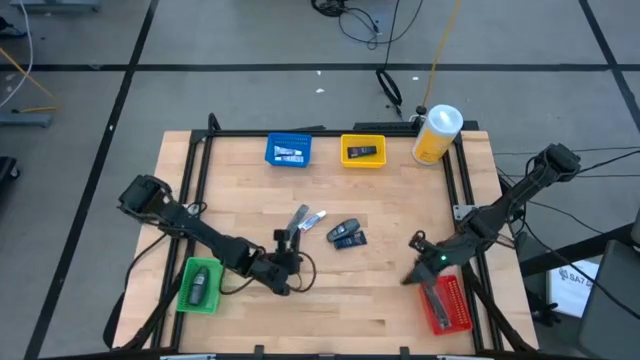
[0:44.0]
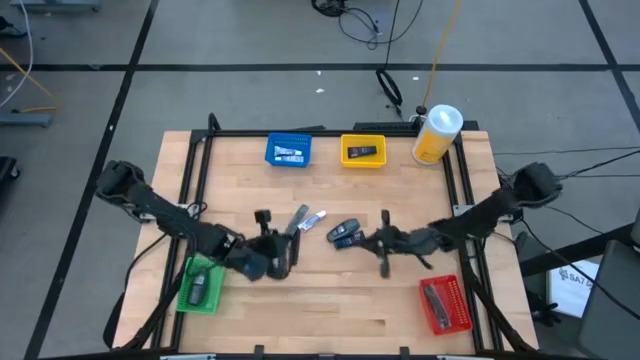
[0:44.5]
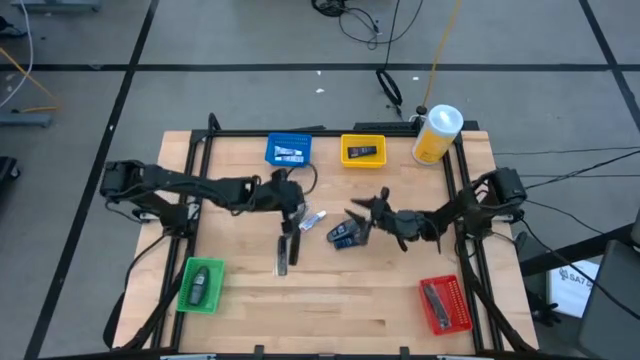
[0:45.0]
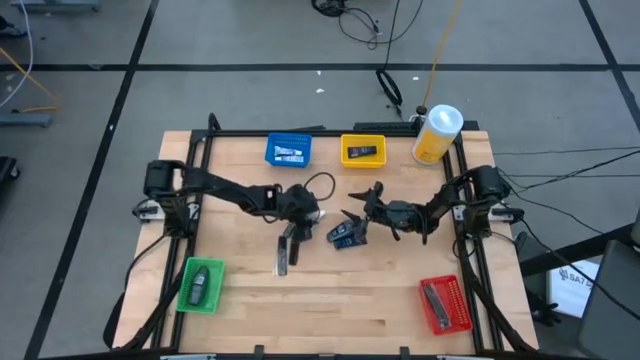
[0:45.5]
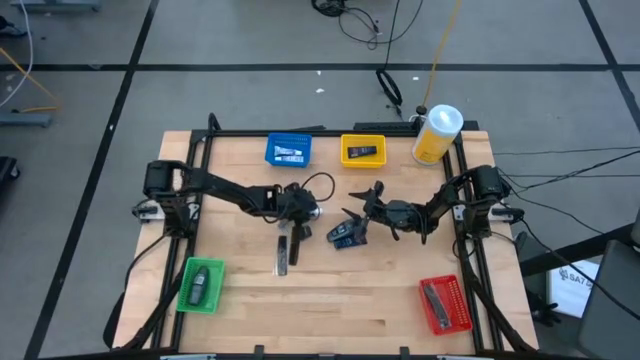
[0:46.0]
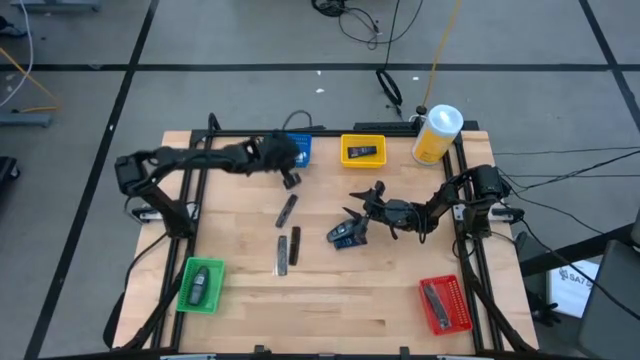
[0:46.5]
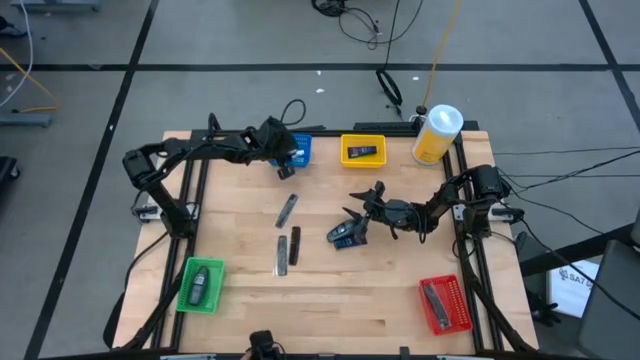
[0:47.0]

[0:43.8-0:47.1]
Task: Pick & Place Travel size toiletries
Put the white toothpaste into the blue bin

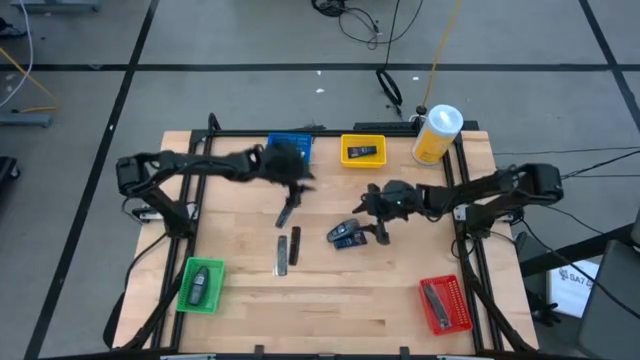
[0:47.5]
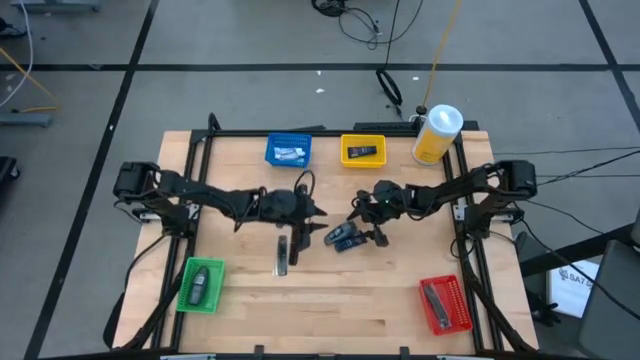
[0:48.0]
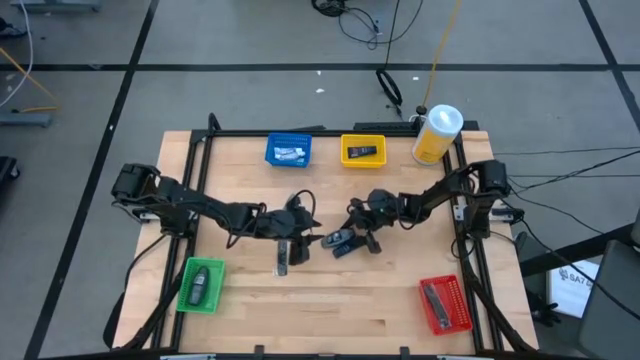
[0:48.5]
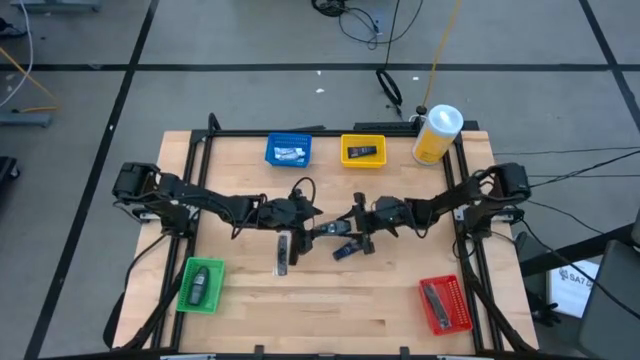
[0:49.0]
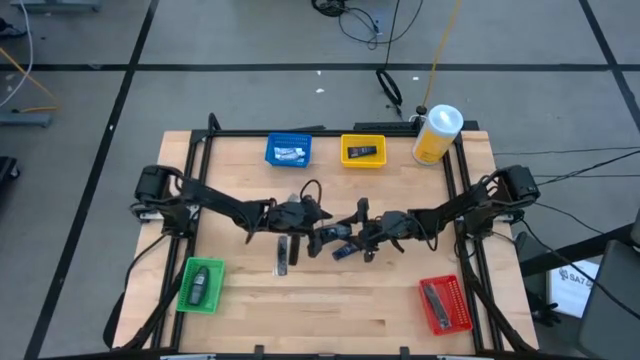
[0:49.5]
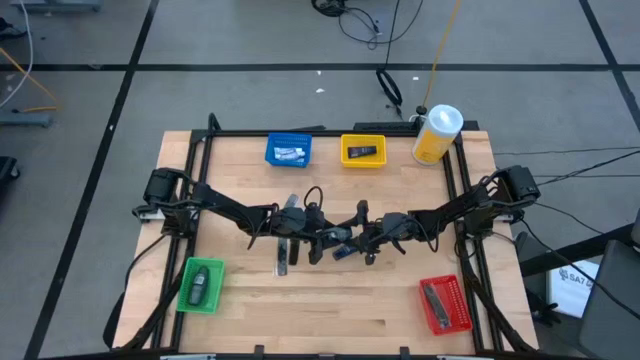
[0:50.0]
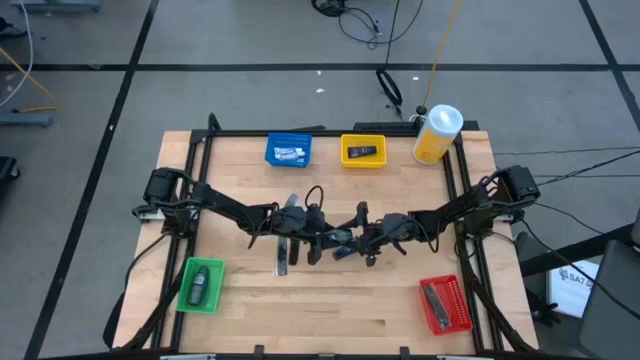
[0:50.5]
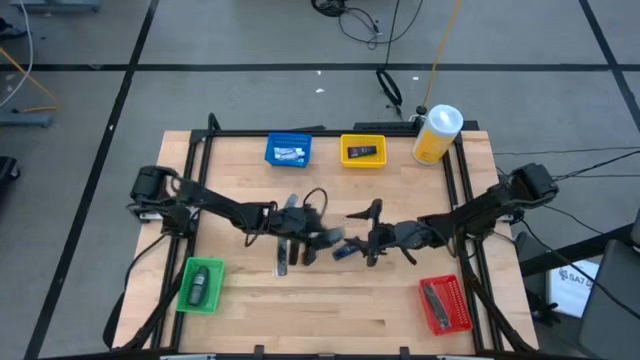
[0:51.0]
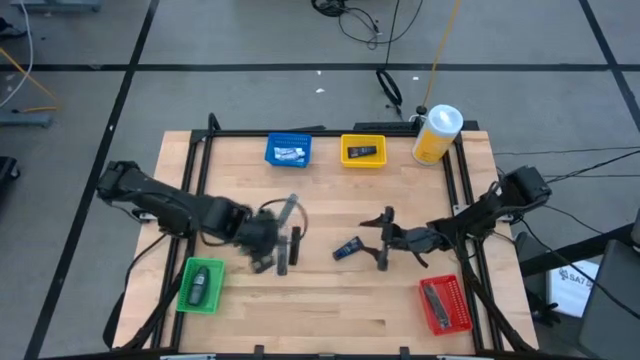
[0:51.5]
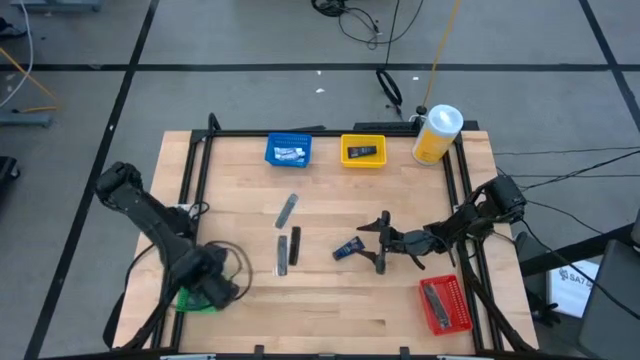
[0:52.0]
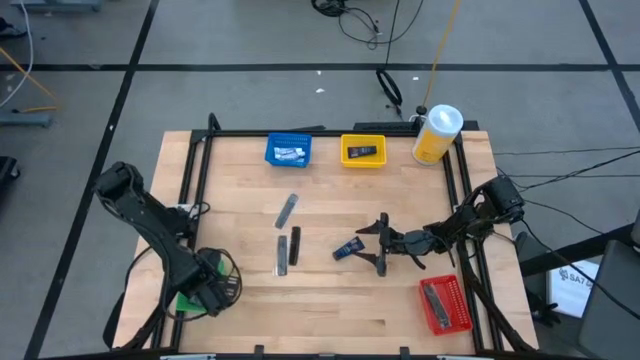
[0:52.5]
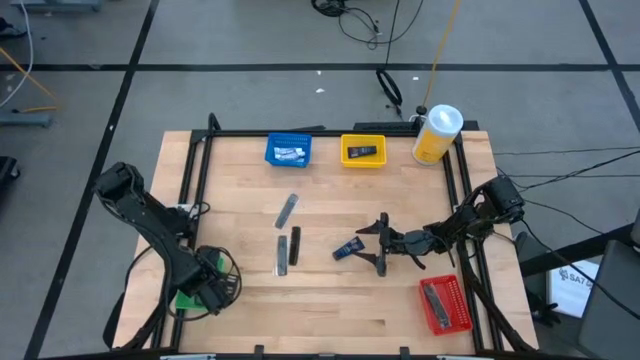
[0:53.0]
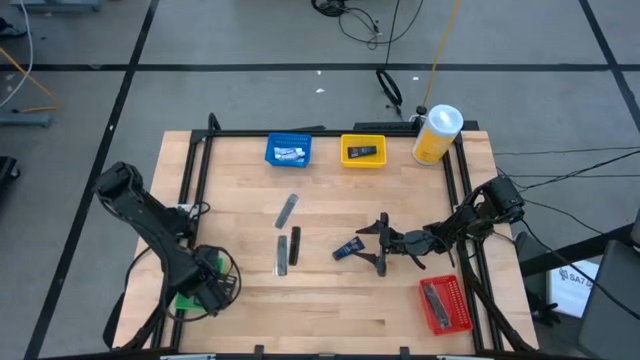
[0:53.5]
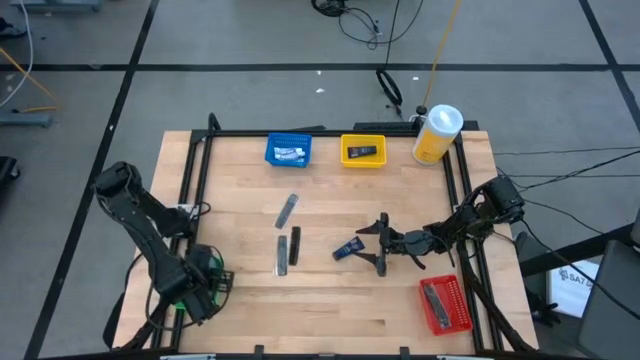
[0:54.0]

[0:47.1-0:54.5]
Put the gray deodorant into the green bin

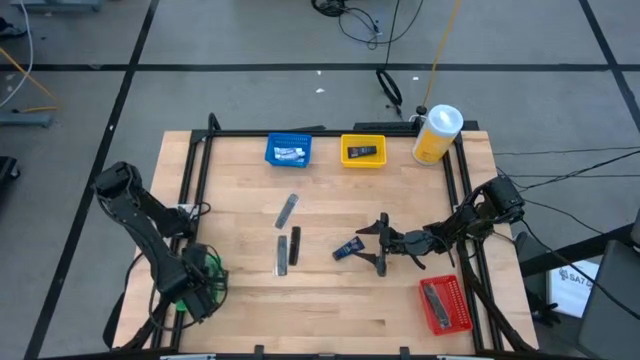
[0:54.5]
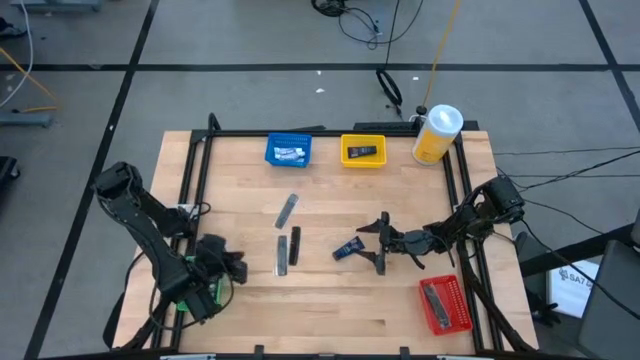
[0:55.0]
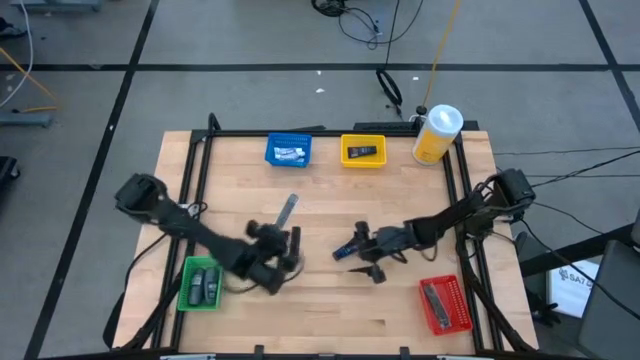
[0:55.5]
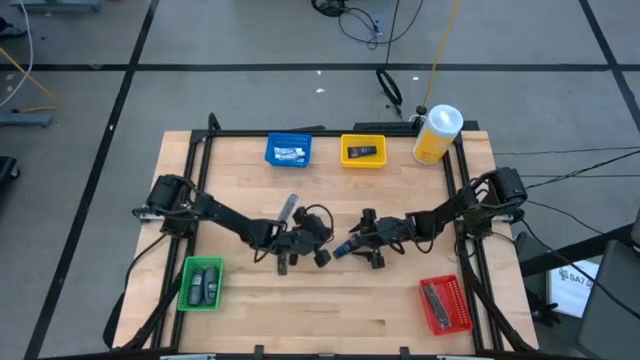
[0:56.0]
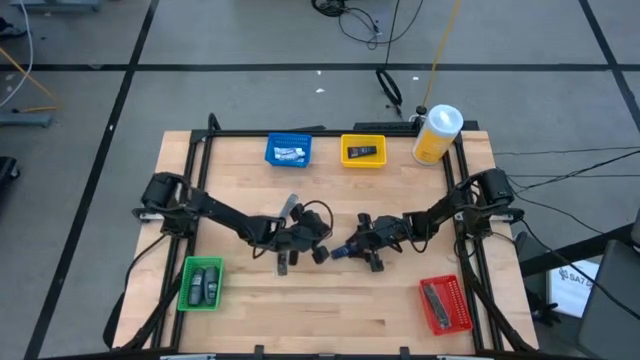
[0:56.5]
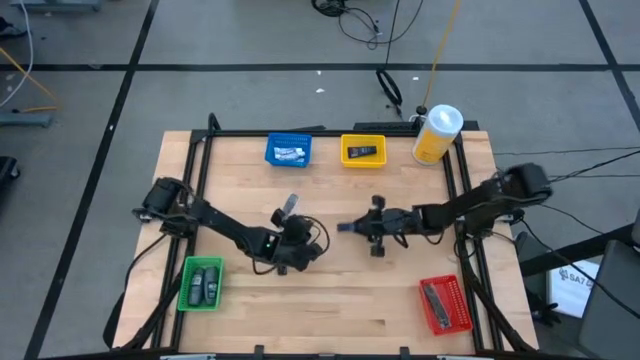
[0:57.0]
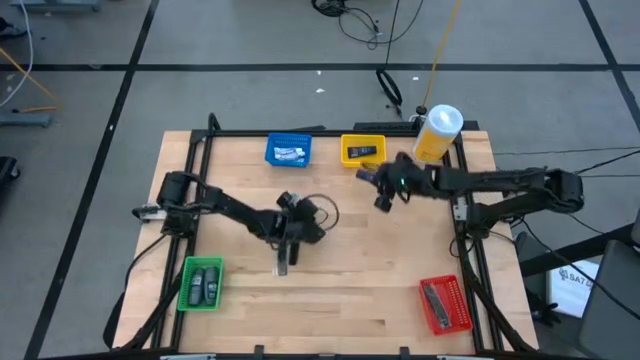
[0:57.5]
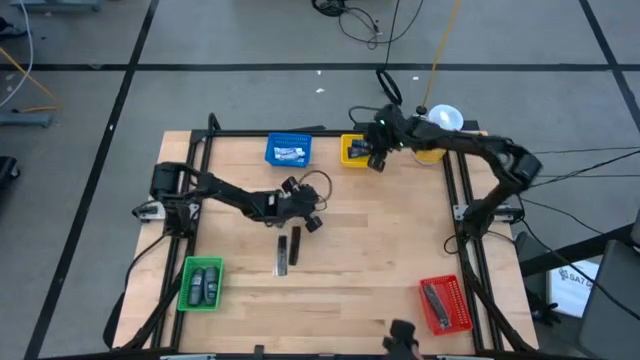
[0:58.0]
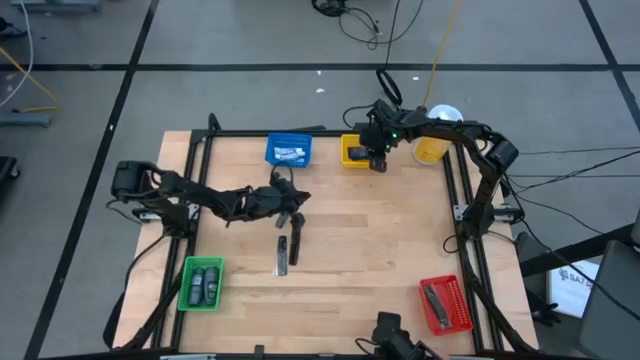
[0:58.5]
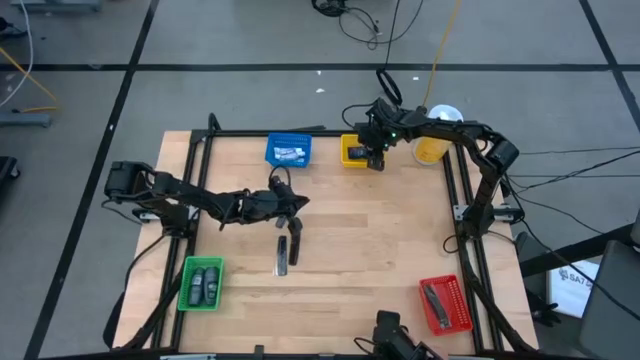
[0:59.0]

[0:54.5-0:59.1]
Put the blue shave cream into the yellow bin

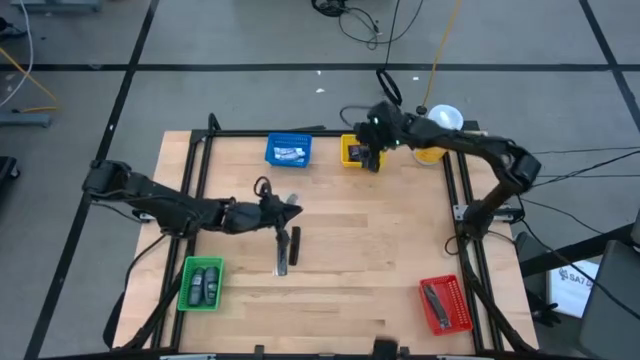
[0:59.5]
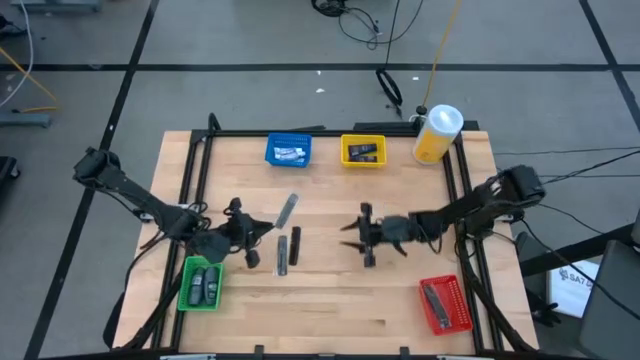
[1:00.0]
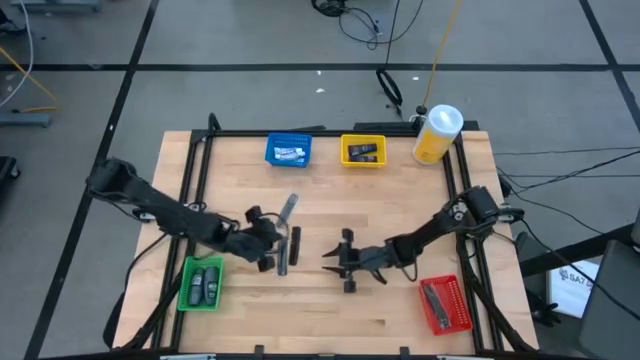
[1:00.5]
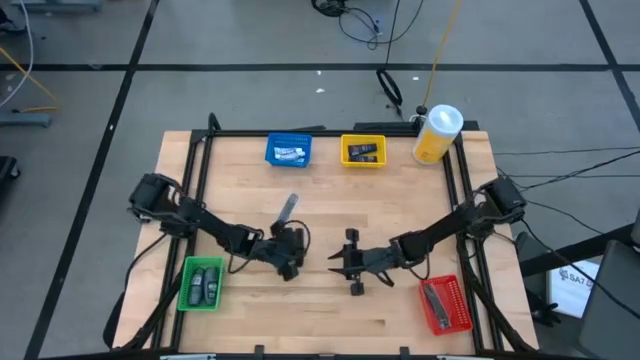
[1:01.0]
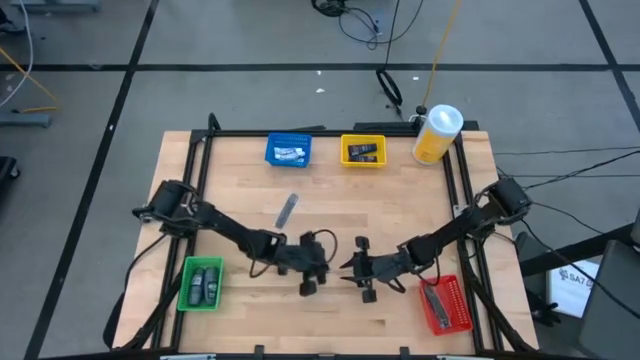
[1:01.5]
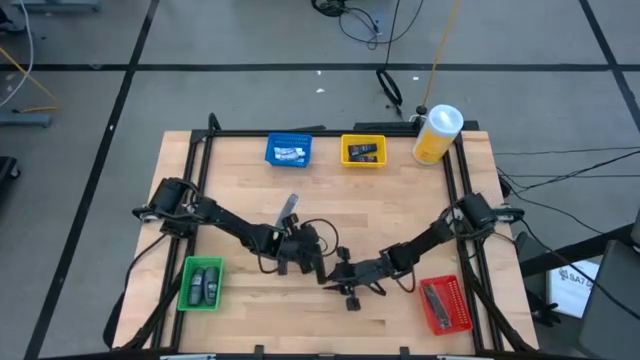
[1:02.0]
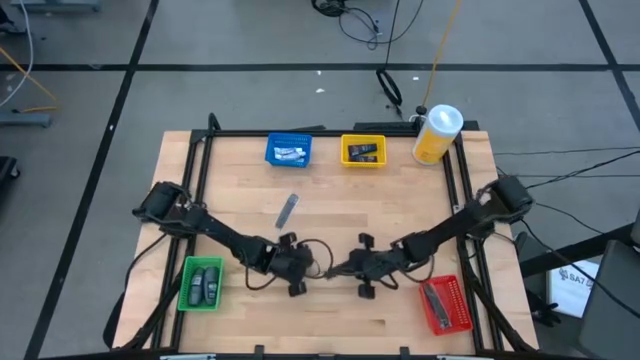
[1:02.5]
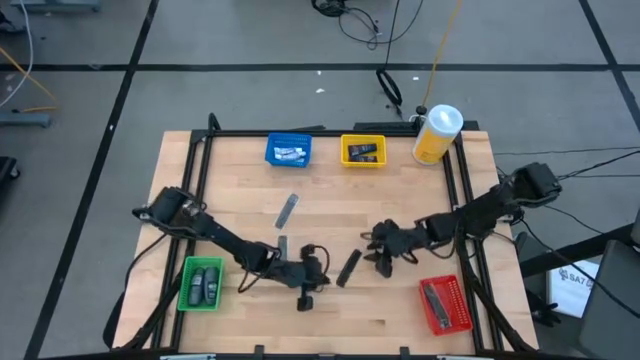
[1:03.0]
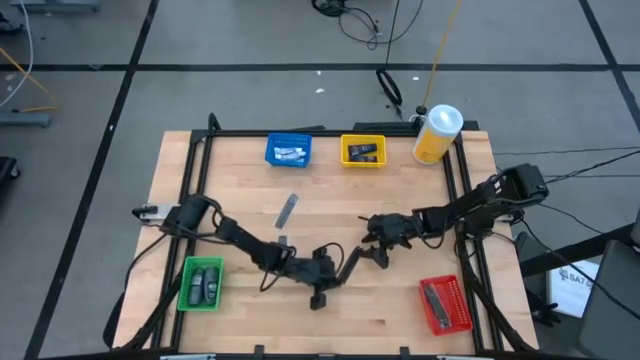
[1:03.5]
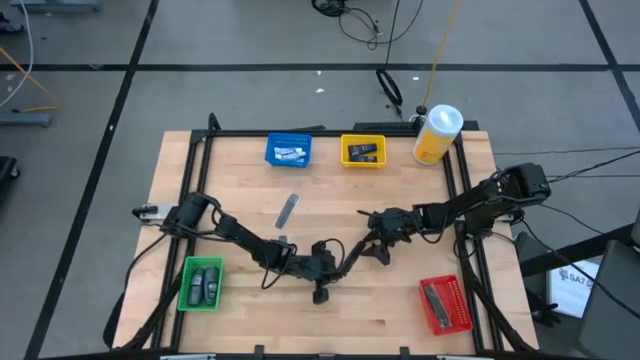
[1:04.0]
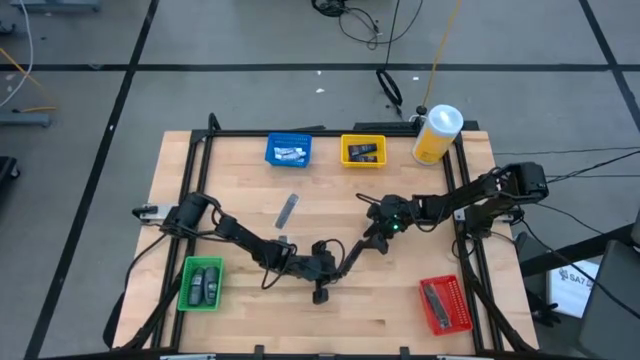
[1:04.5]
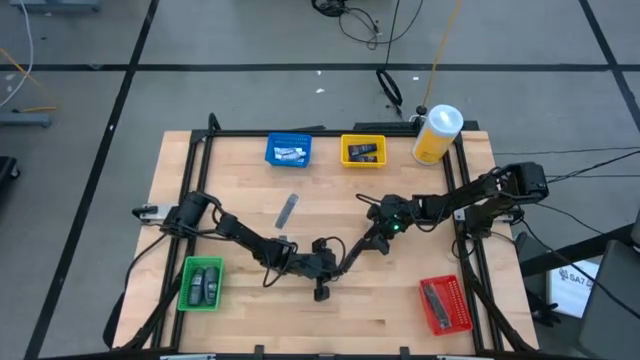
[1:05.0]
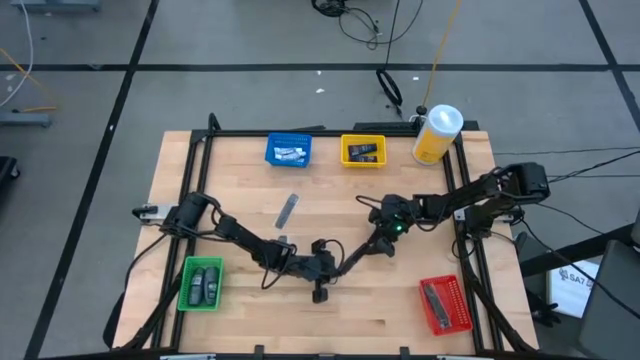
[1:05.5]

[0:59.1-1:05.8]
Put the black hair comb into the red bin
